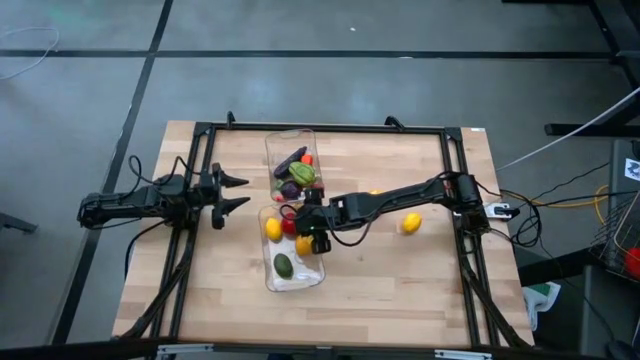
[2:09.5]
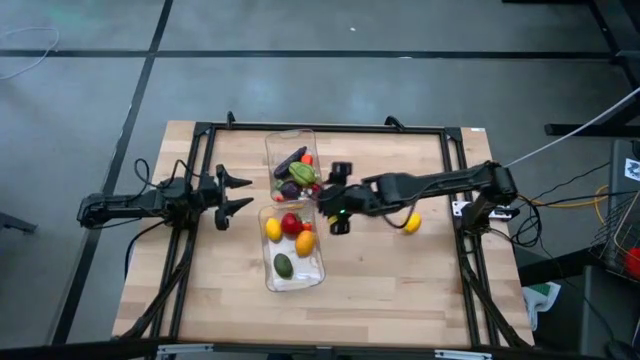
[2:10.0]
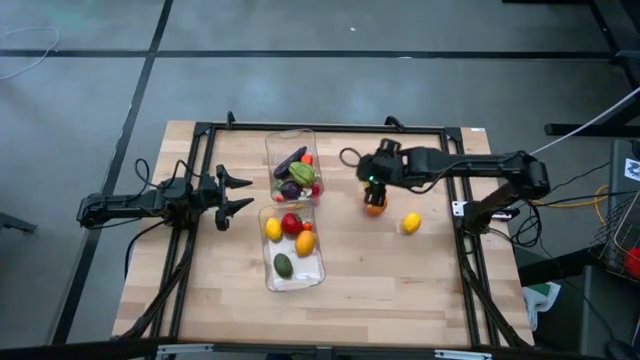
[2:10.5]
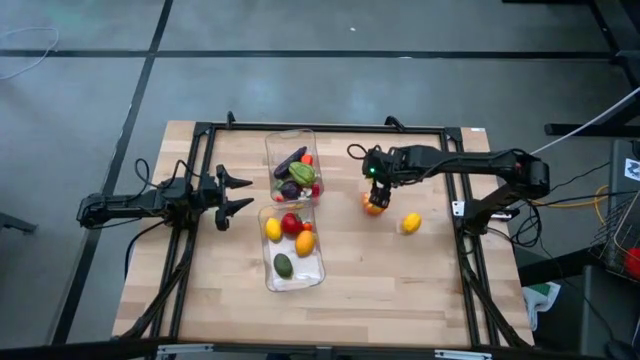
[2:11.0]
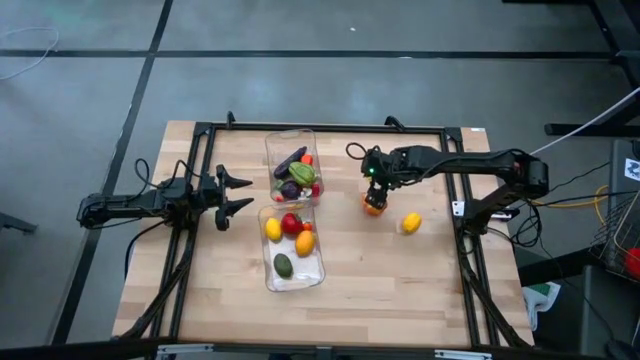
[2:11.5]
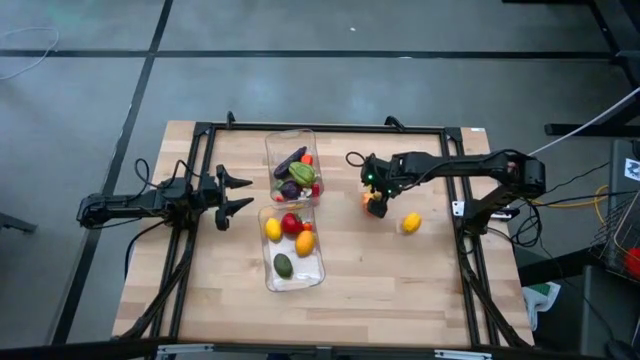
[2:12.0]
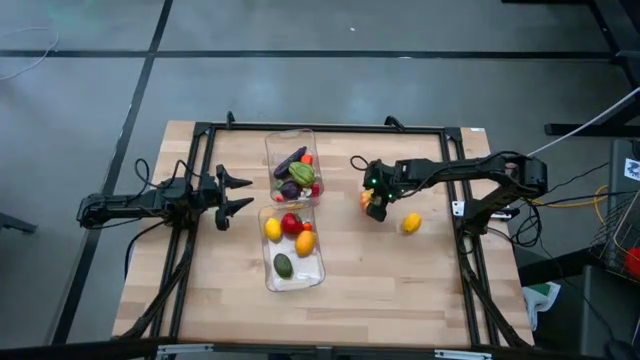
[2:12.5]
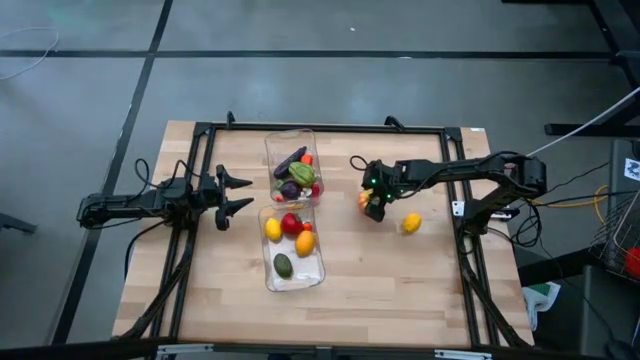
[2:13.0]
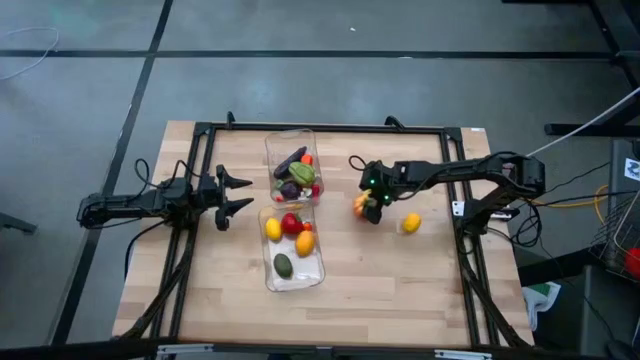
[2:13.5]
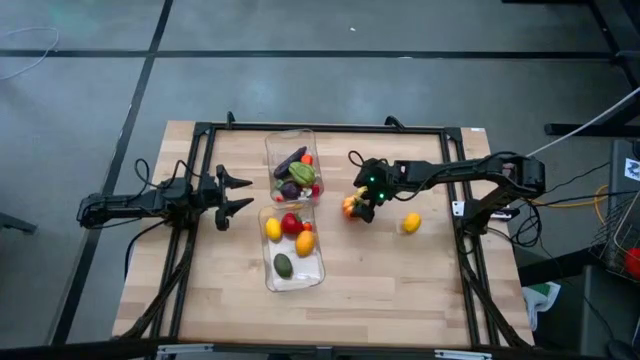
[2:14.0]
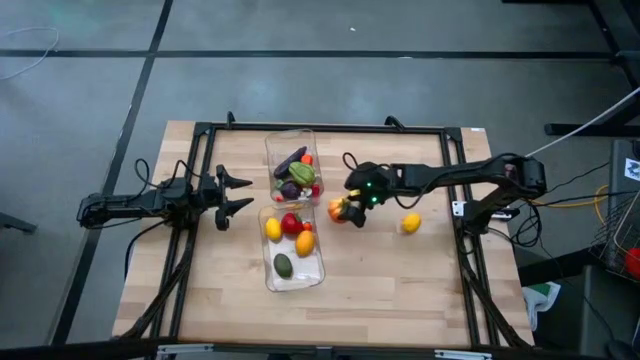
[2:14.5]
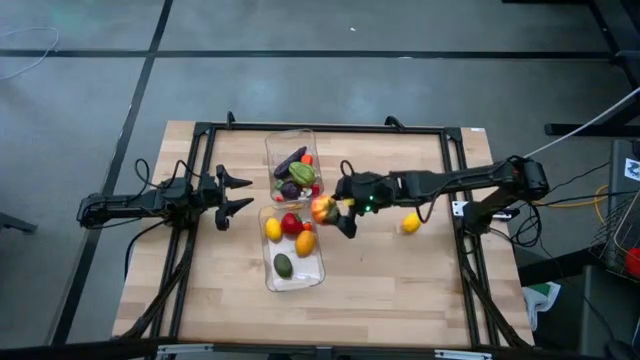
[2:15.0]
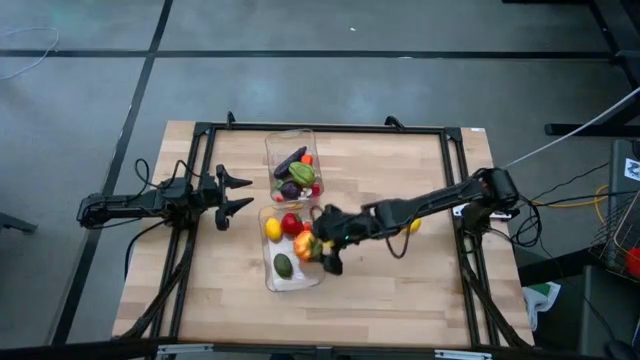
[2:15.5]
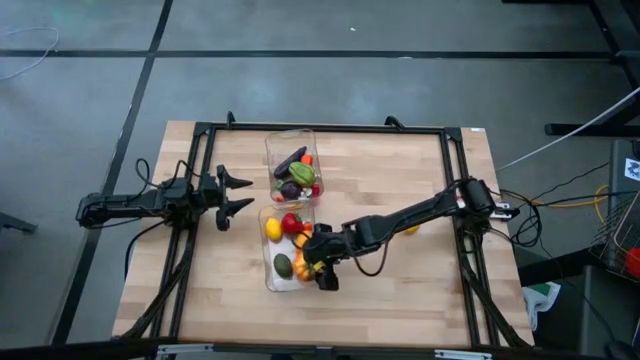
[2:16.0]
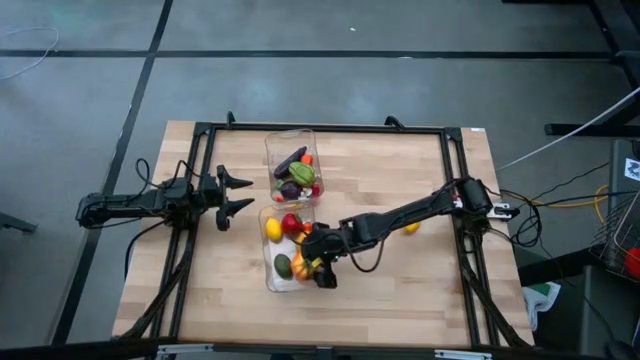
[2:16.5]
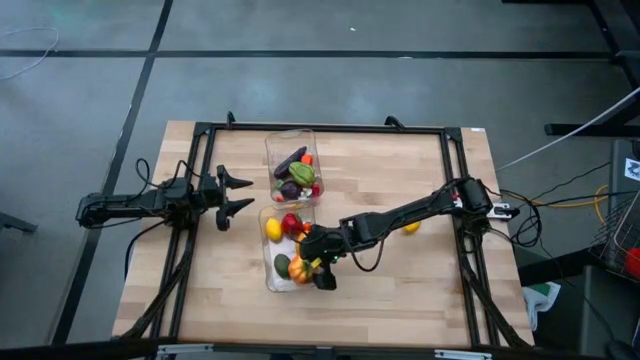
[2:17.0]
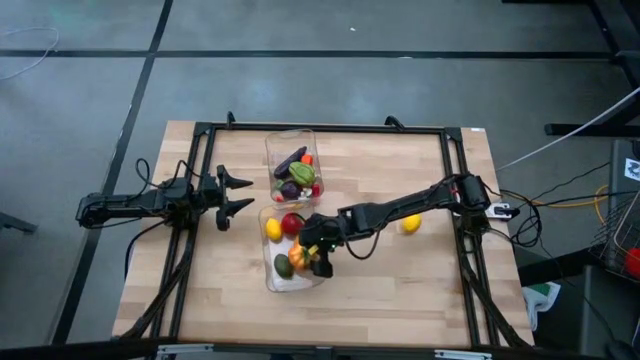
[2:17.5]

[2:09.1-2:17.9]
Task: Sort produce into baskets
Put the yellow pumpkin into the bottom transparent bin

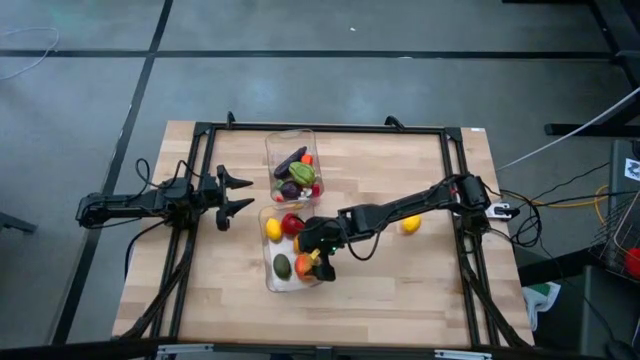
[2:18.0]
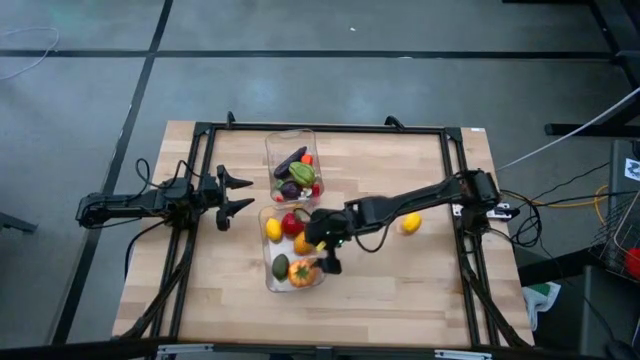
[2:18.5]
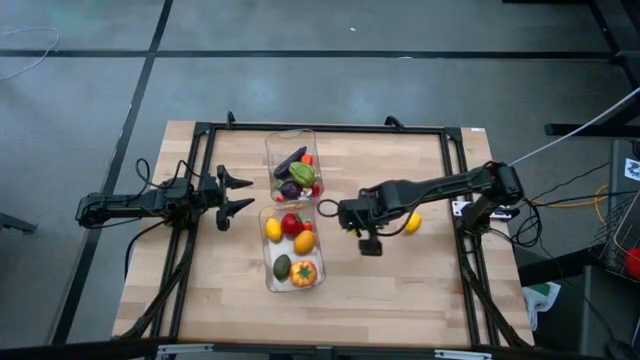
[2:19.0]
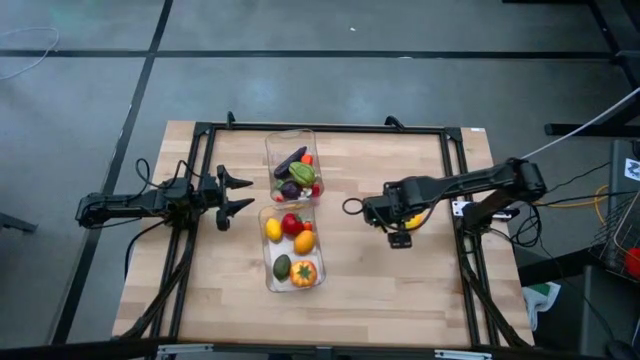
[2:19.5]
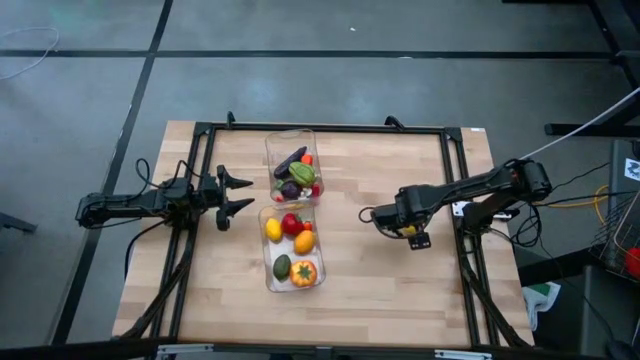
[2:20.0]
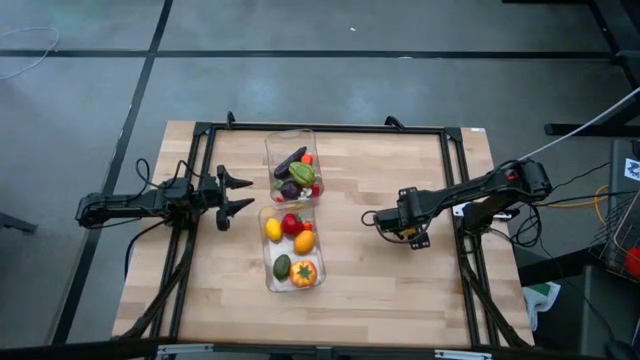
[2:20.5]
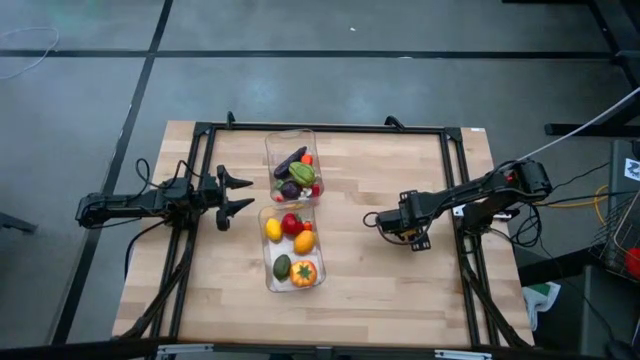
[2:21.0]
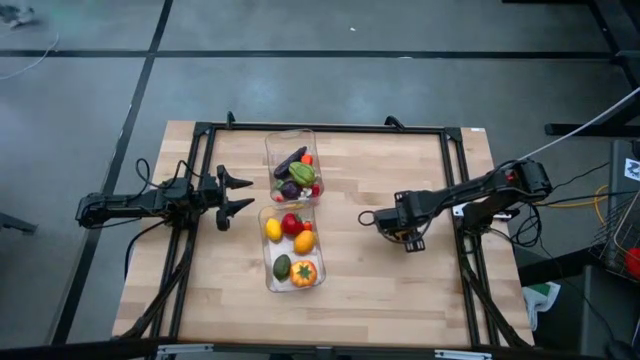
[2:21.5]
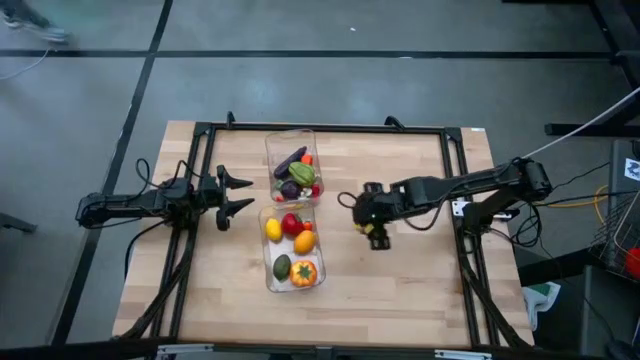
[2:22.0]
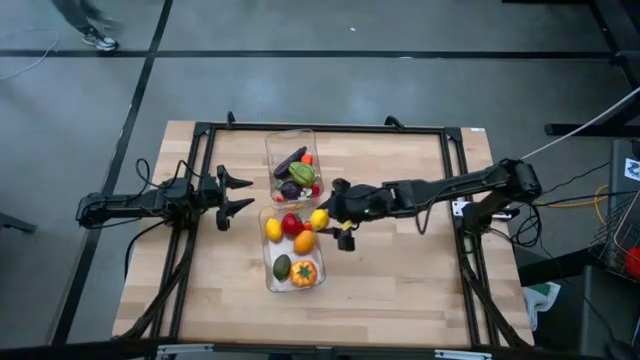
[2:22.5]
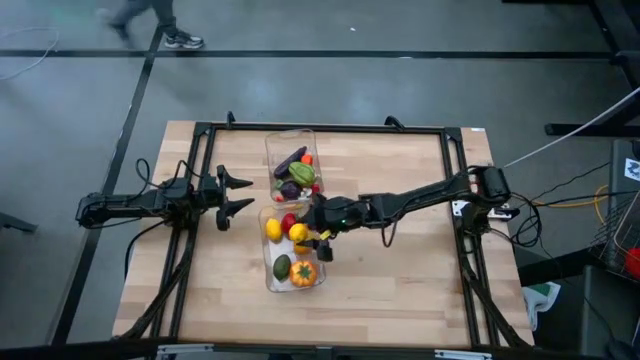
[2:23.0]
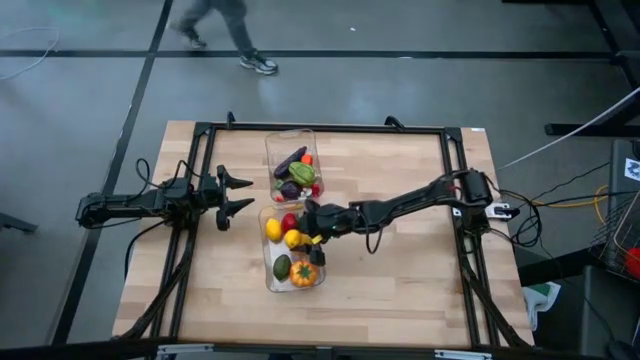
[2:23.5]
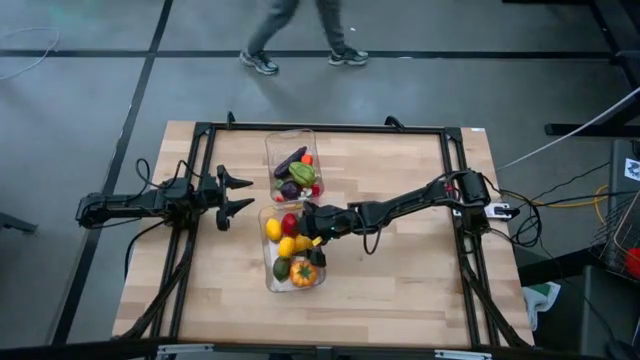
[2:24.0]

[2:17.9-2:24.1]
Put the yellow lemon into the bottom transparent bin

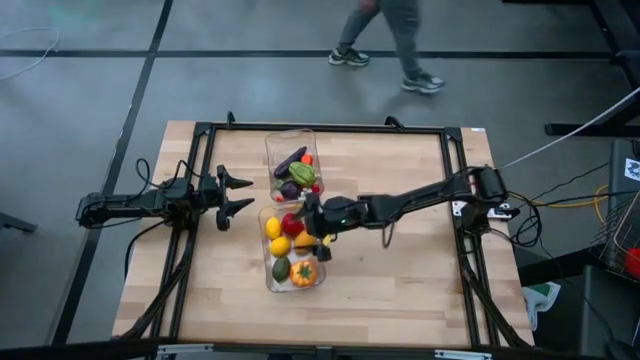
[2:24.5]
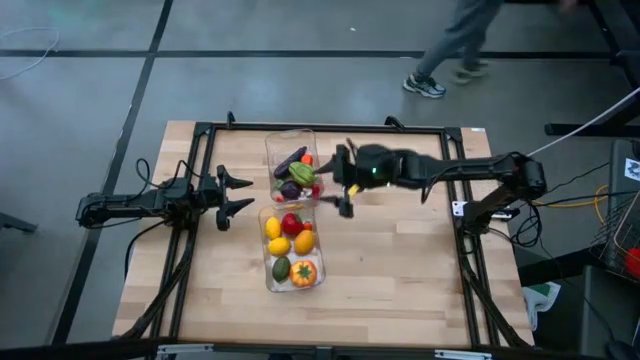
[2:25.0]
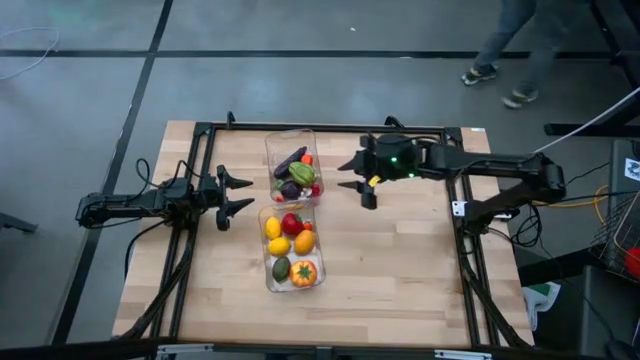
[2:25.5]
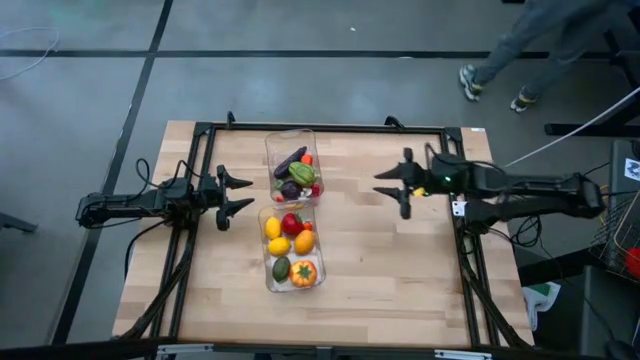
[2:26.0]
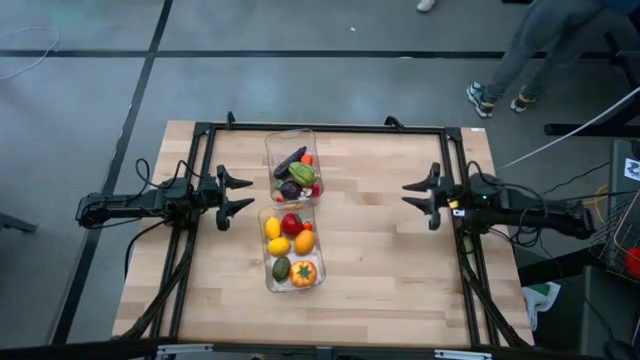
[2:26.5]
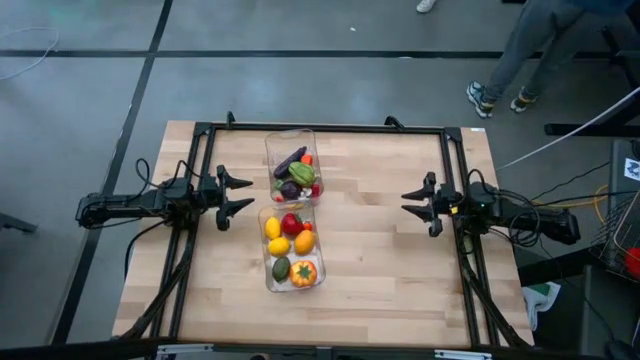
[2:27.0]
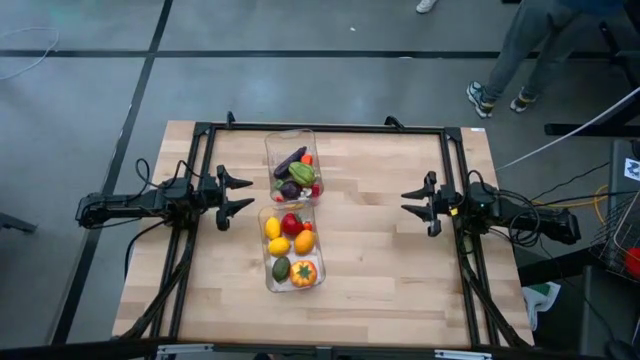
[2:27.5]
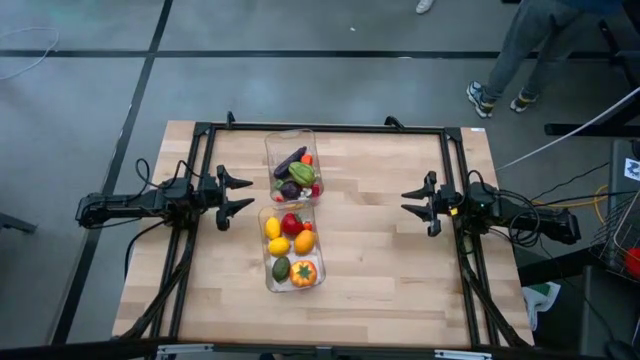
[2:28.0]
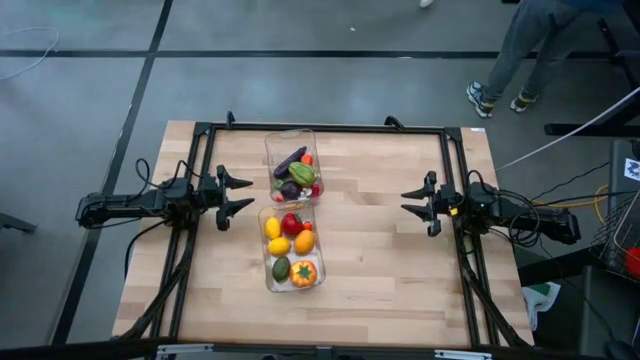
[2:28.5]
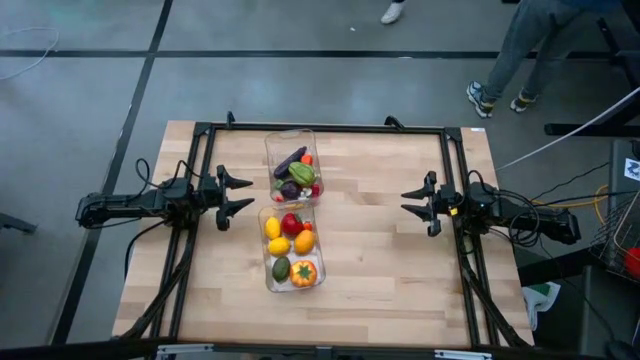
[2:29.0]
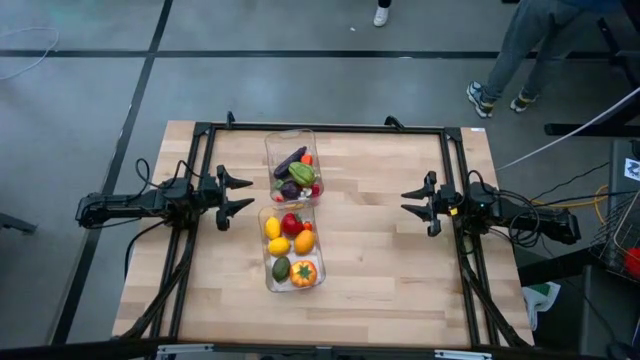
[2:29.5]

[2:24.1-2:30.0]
Return to Home Position
